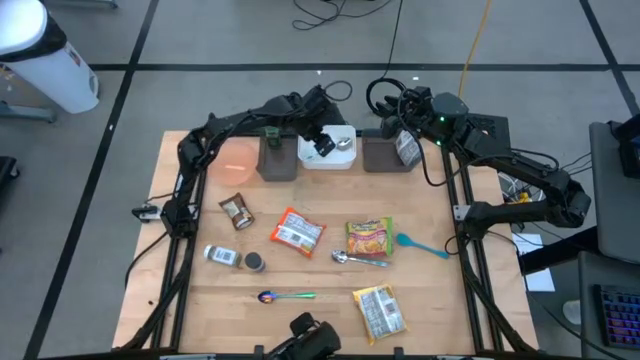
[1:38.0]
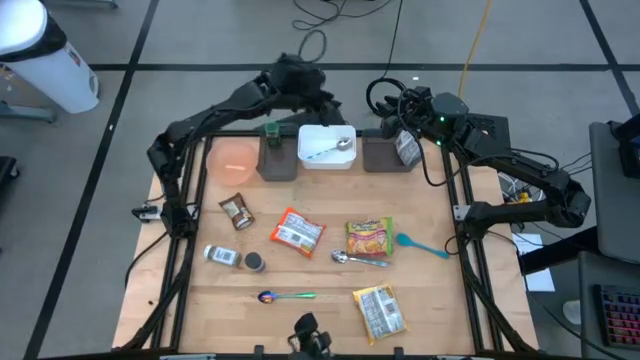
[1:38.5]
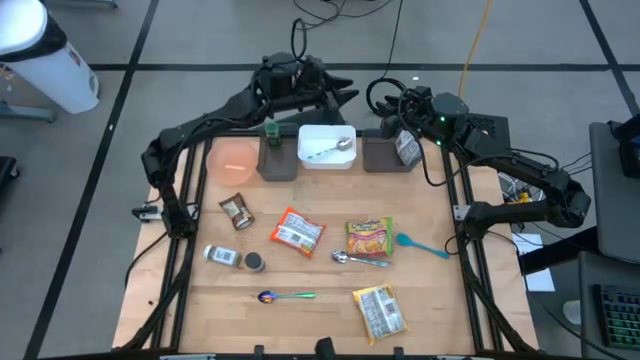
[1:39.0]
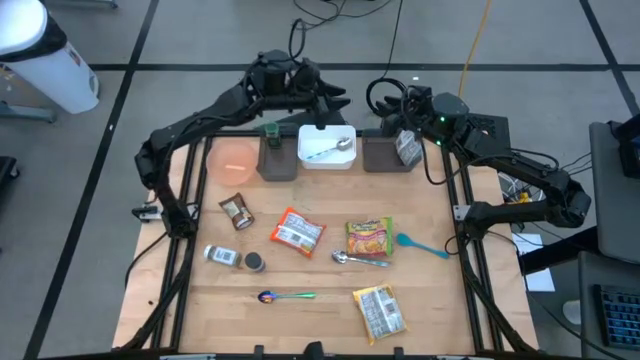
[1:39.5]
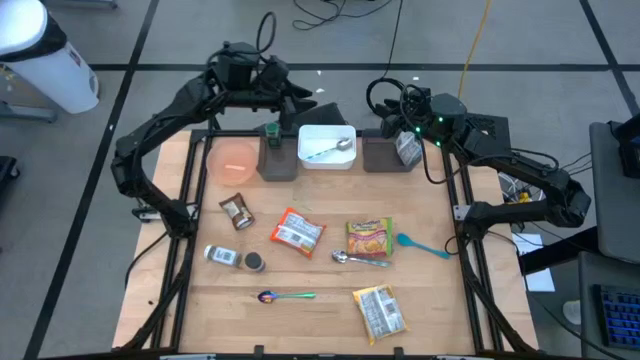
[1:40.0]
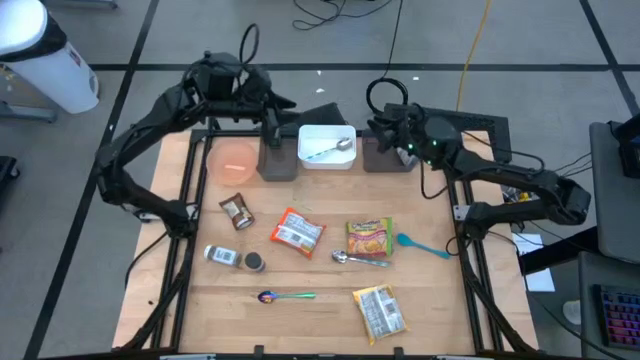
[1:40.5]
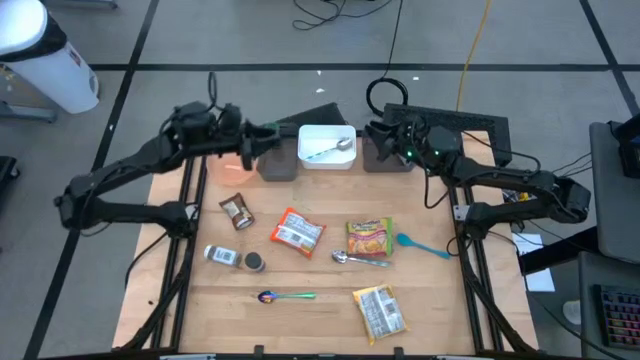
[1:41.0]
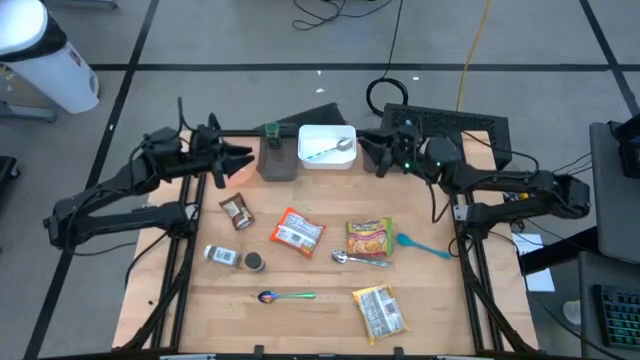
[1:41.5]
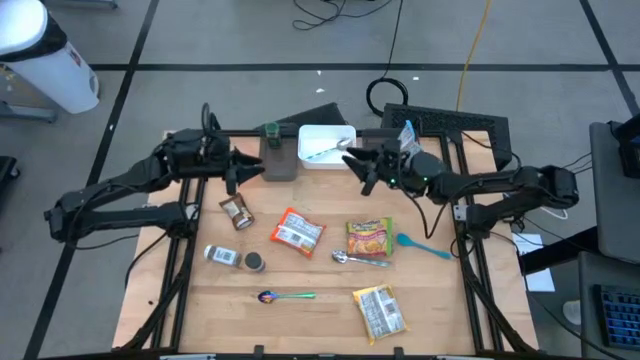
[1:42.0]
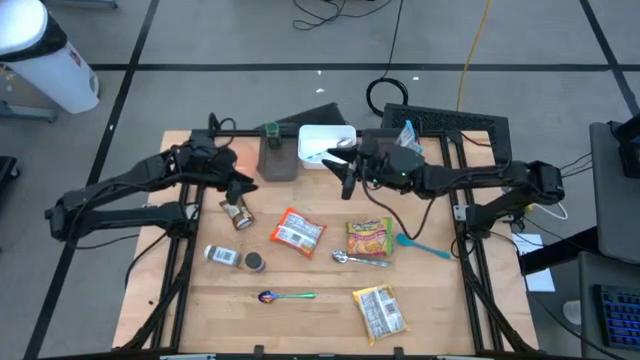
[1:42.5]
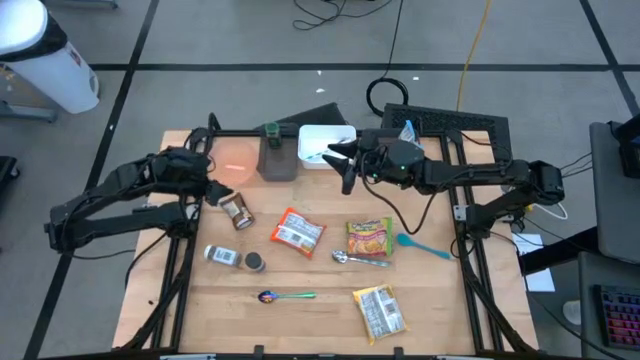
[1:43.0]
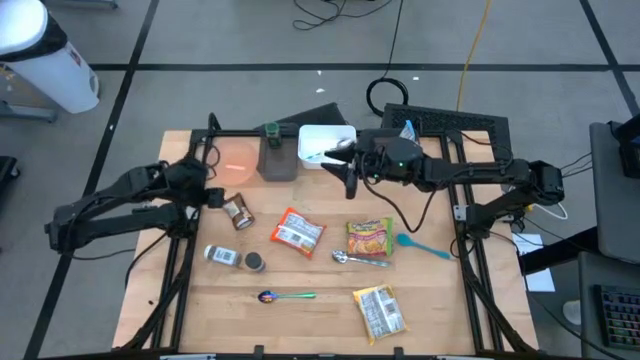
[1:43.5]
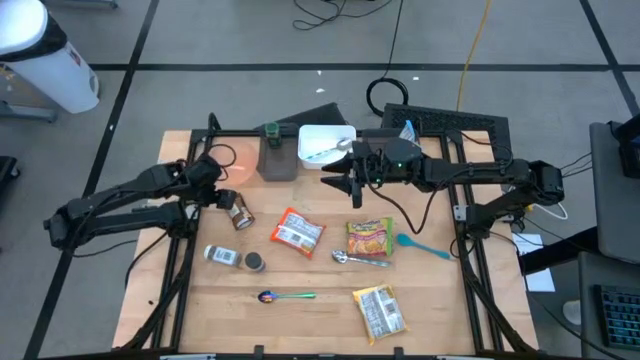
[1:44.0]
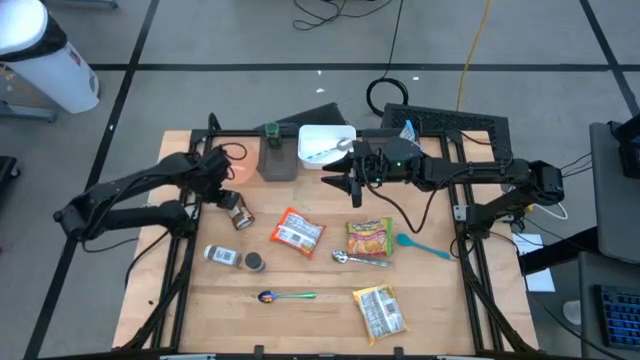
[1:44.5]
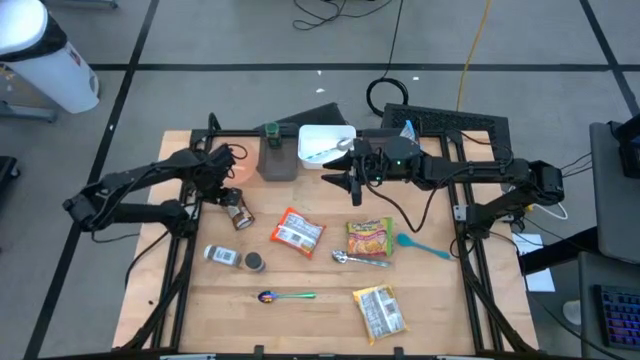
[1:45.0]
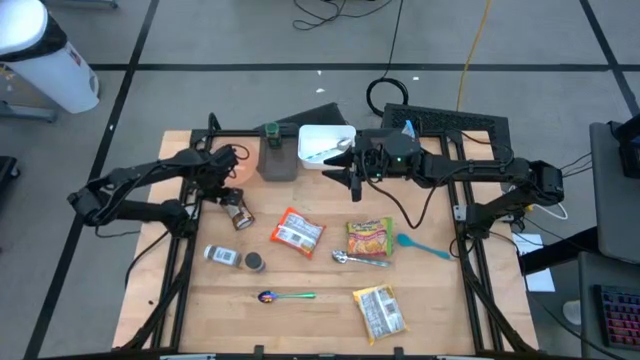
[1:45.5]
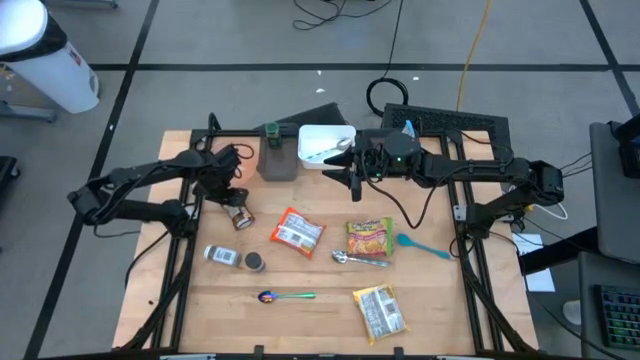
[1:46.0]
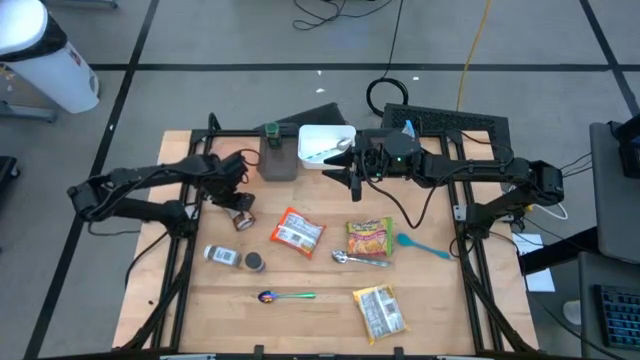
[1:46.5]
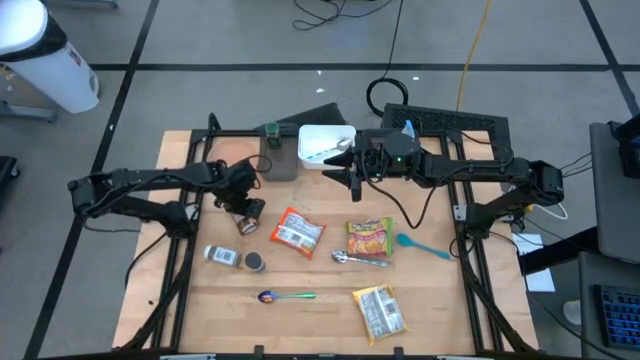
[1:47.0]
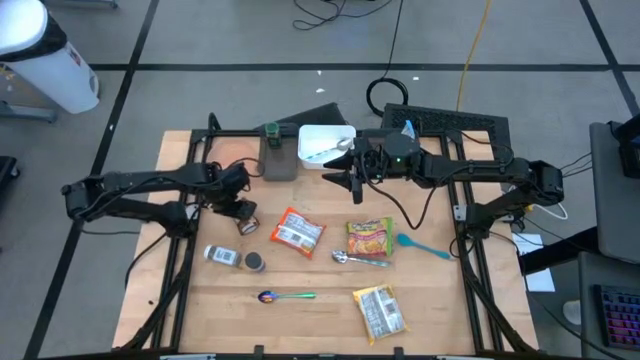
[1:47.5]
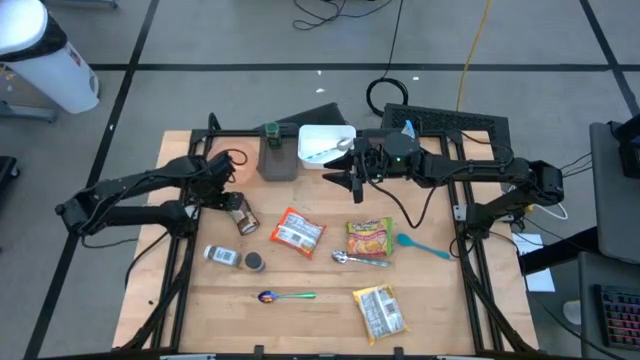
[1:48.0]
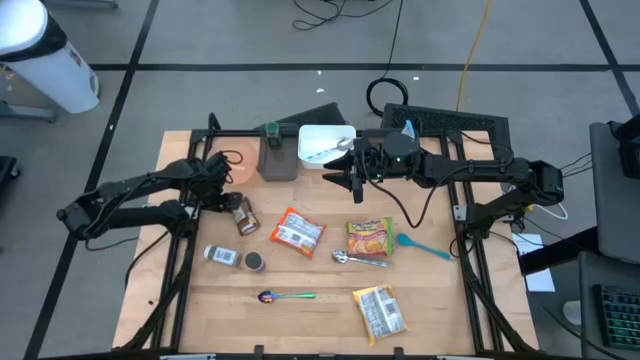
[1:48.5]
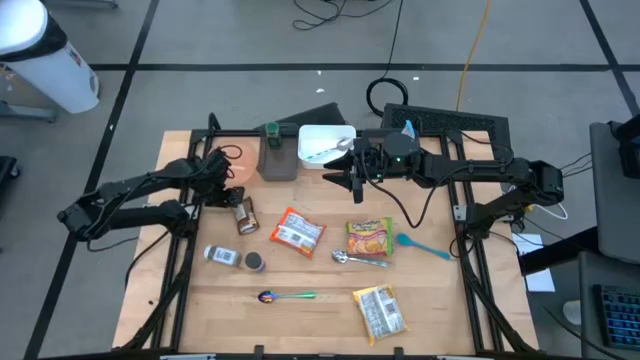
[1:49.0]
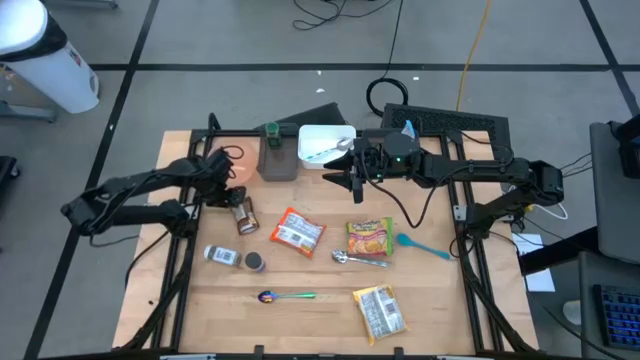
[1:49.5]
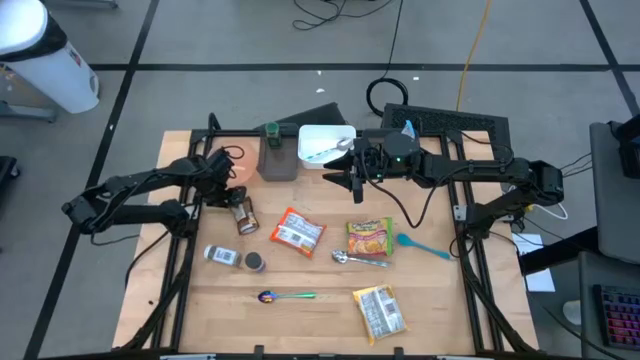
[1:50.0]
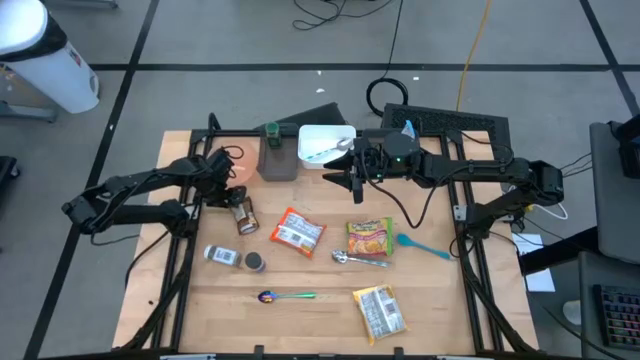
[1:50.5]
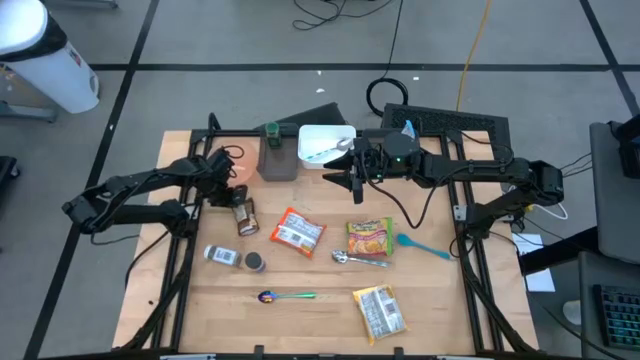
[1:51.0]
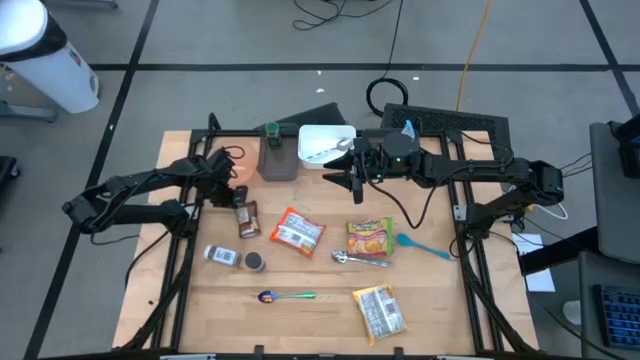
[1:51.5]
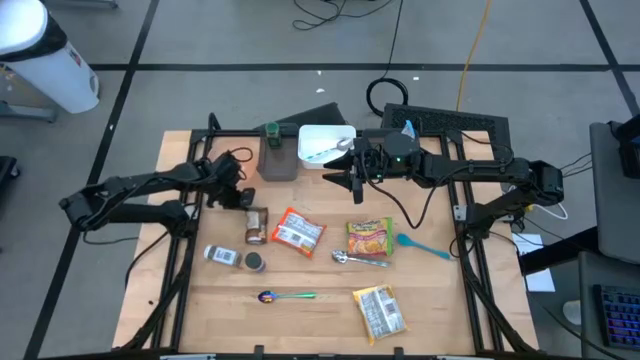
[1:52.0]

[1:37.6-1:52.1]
Task: Pick & Place Food Item
Put the orange seasoning pack into the left black bin

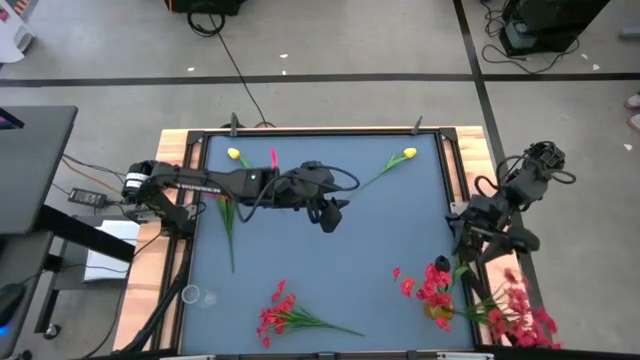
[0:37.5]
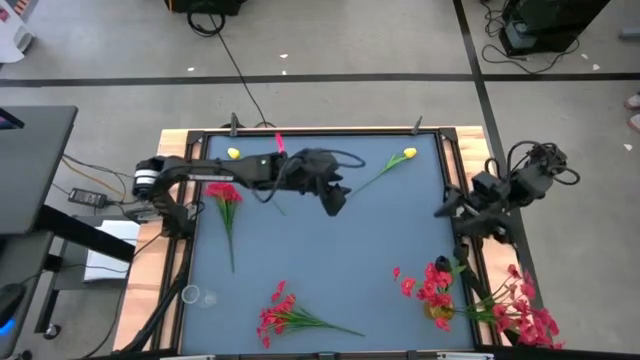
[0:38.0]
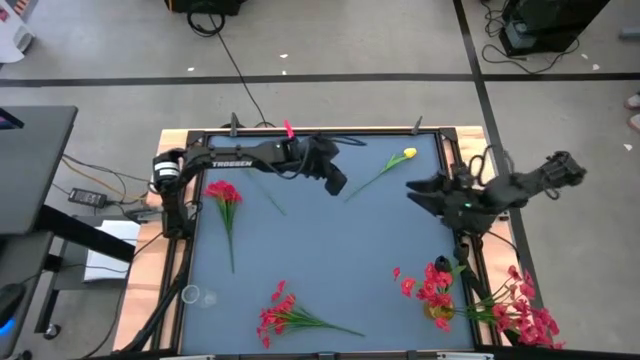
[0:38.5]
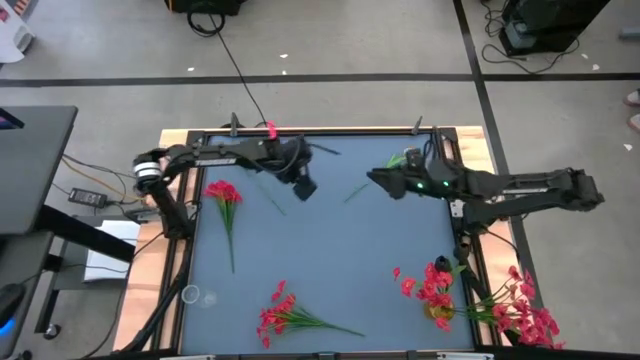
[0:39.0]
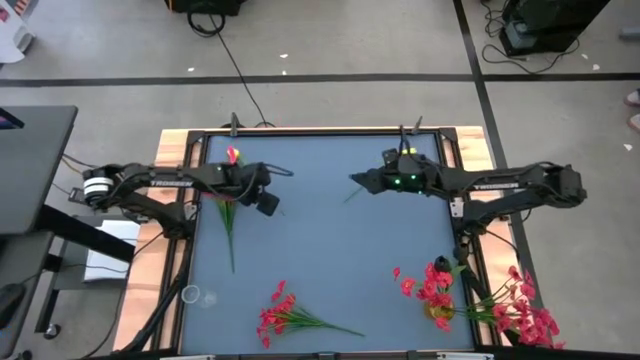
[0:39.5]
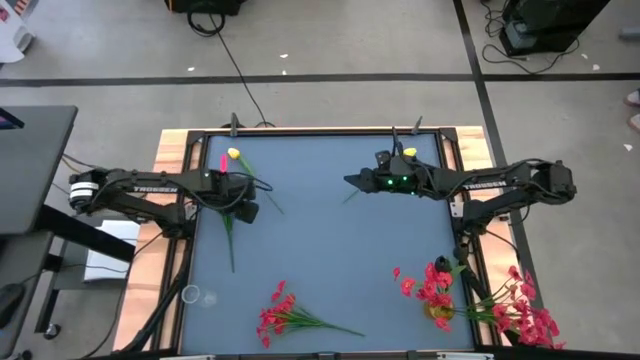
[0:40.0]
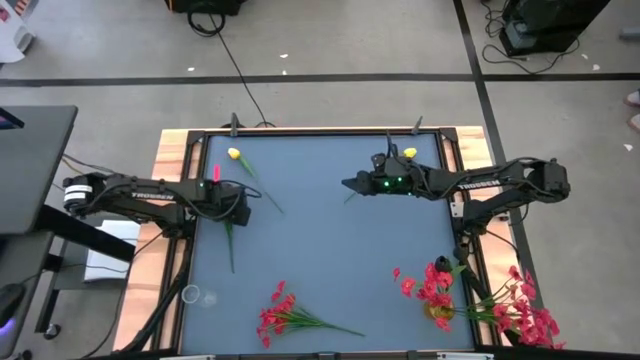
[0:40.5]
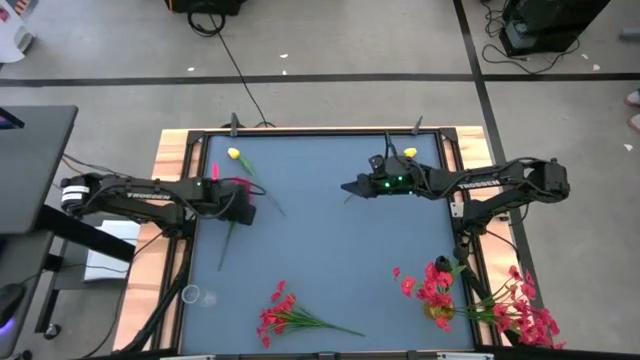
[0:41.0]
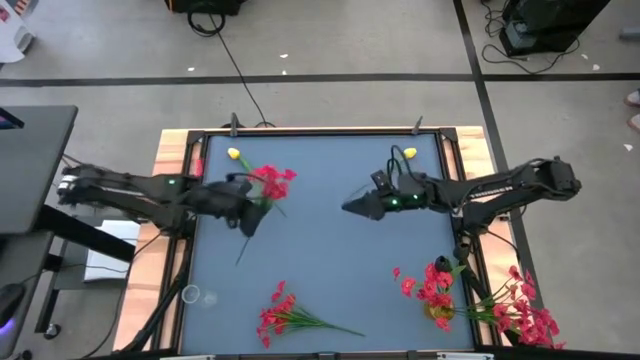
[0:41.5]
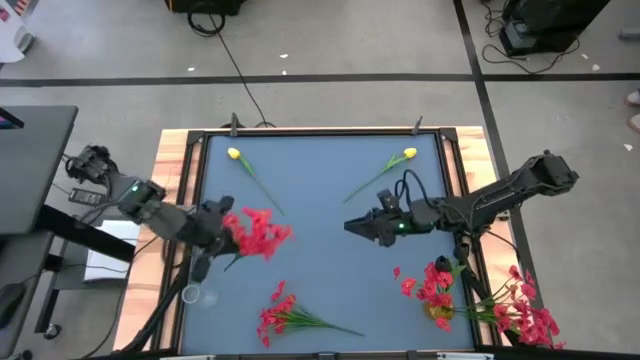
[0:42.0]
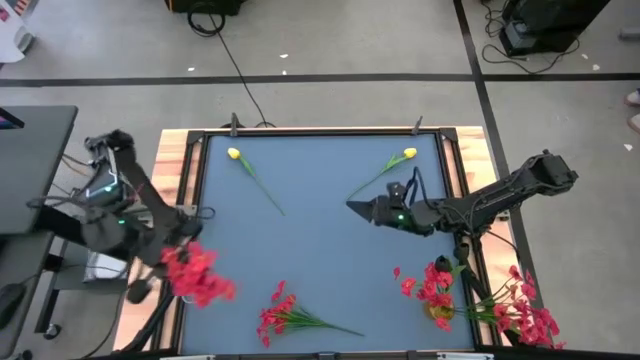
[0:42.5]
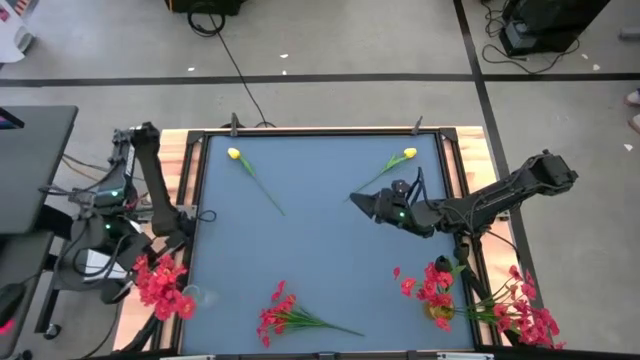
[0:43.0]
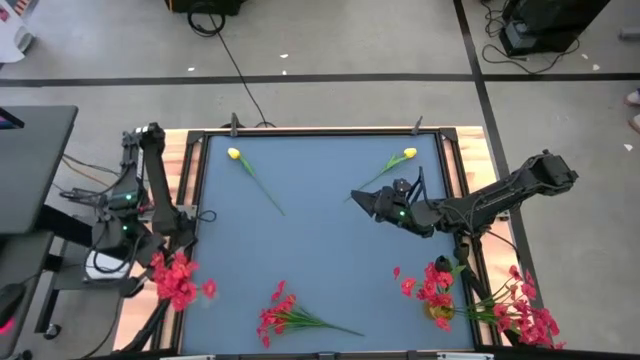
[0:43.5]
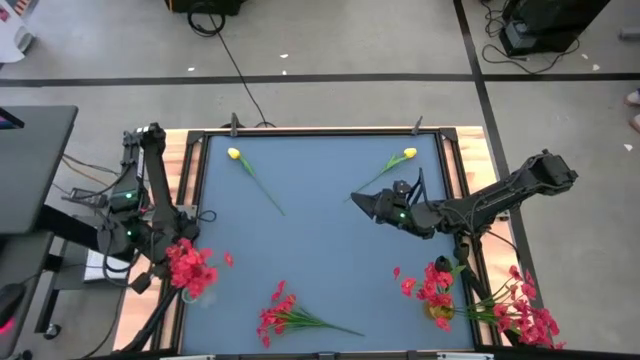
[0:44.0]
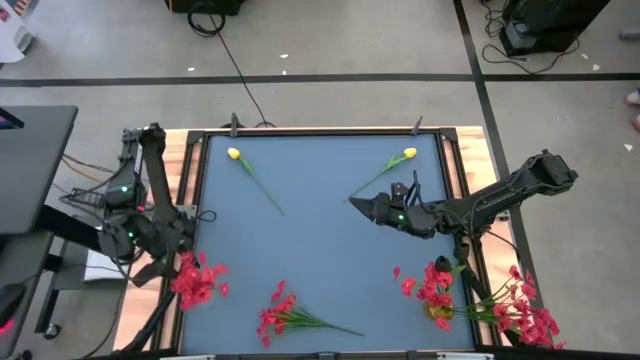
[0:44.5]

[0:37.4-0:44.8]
Task: Sort flowers into vase by color
Put the top red flowers into the transparent vase
